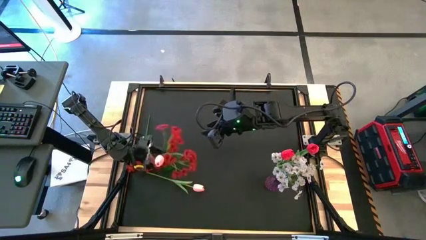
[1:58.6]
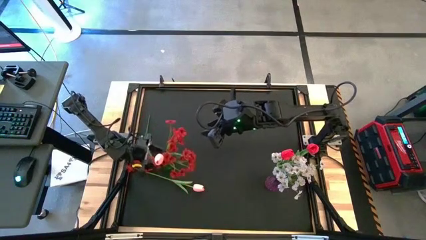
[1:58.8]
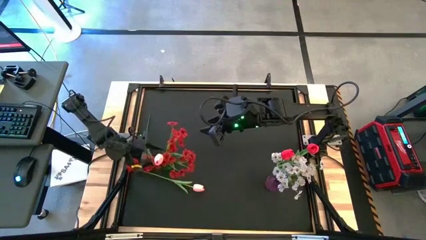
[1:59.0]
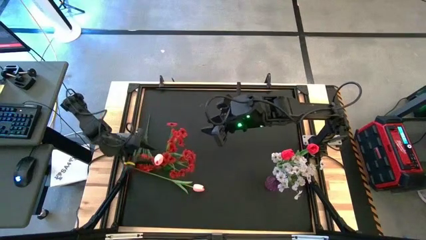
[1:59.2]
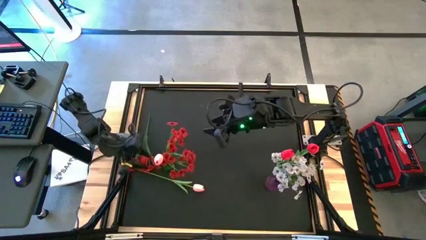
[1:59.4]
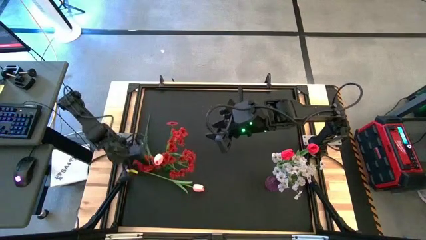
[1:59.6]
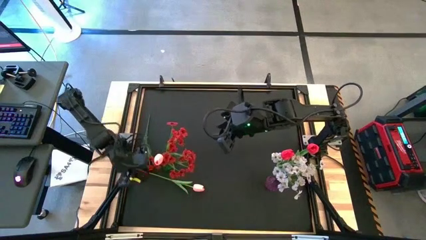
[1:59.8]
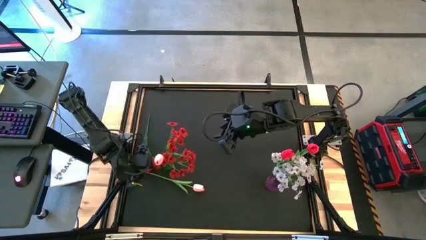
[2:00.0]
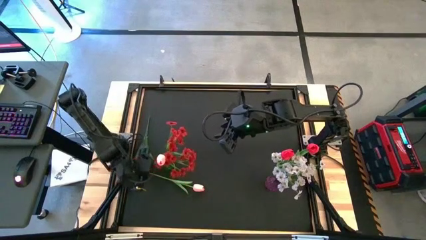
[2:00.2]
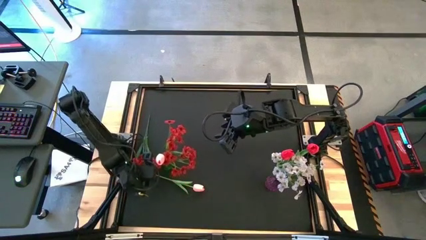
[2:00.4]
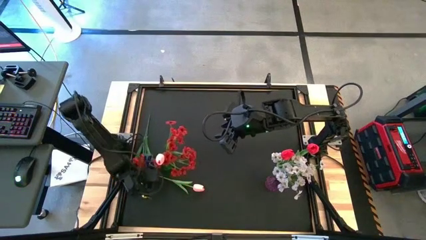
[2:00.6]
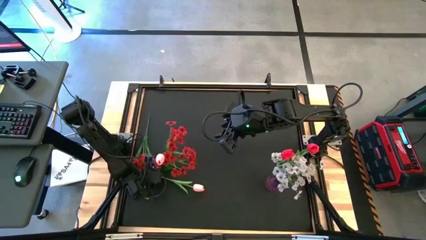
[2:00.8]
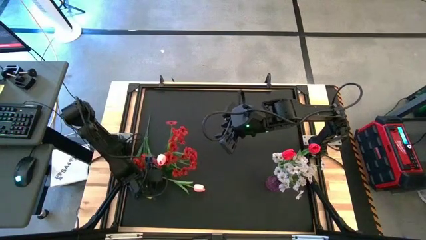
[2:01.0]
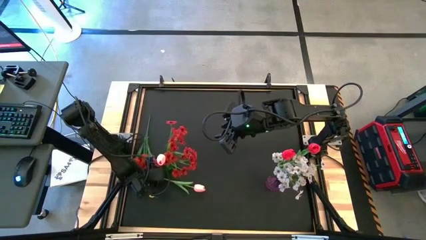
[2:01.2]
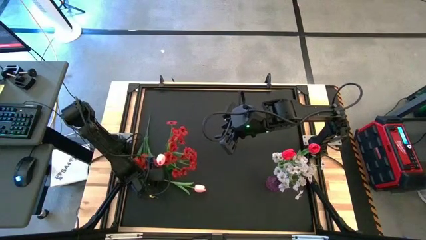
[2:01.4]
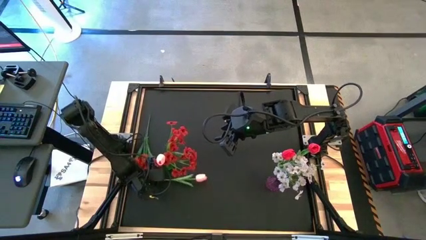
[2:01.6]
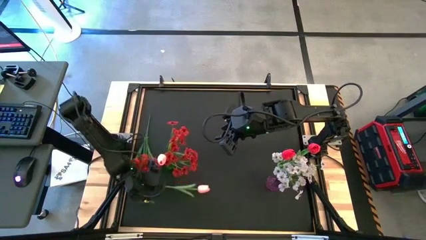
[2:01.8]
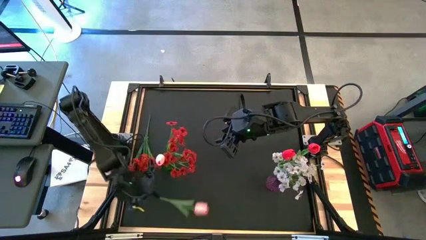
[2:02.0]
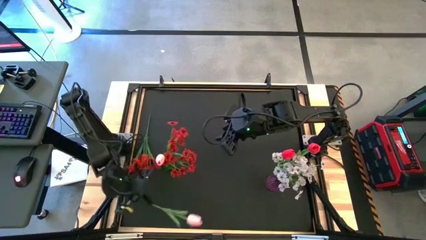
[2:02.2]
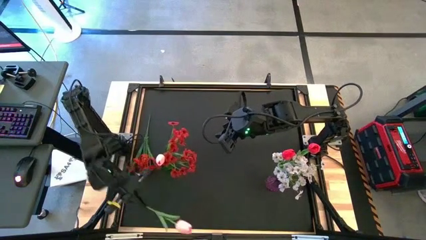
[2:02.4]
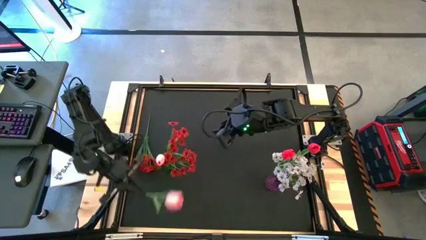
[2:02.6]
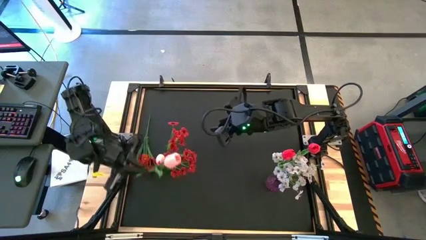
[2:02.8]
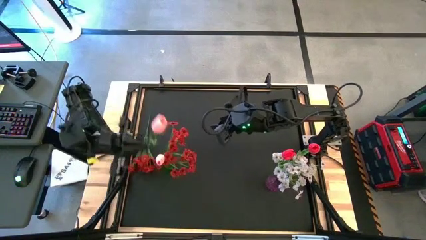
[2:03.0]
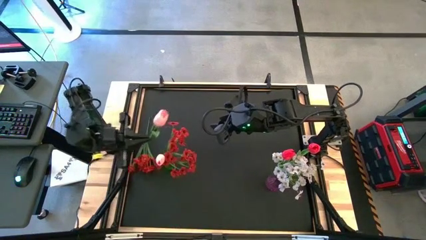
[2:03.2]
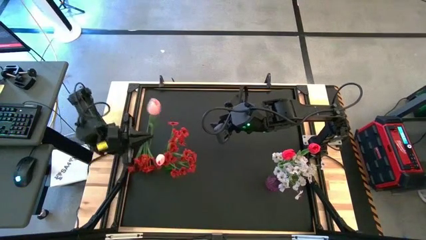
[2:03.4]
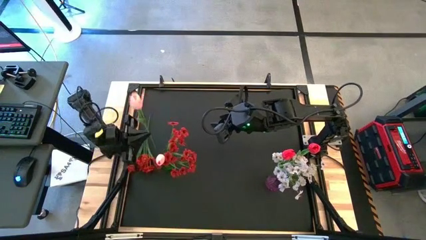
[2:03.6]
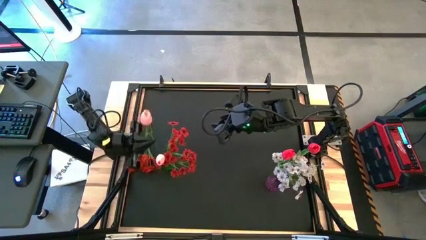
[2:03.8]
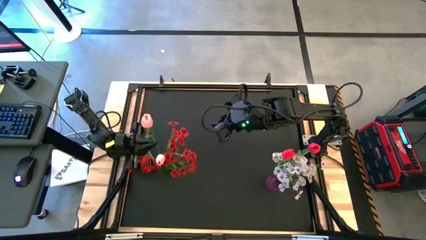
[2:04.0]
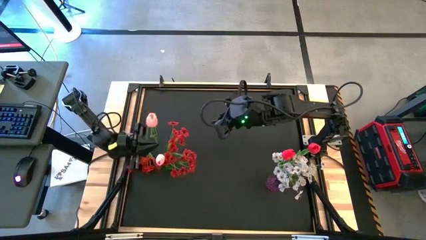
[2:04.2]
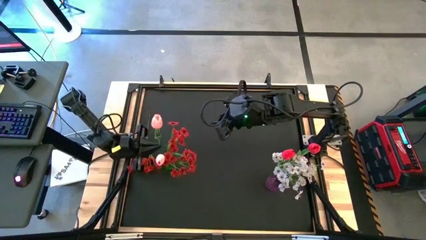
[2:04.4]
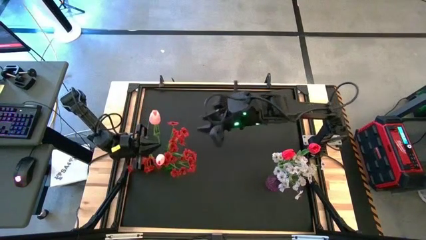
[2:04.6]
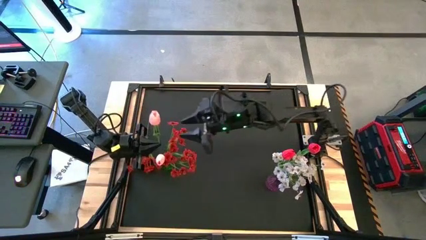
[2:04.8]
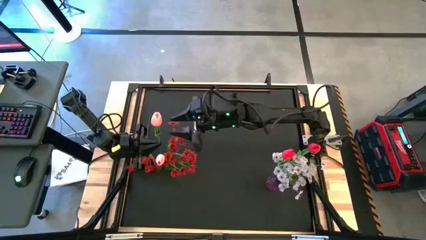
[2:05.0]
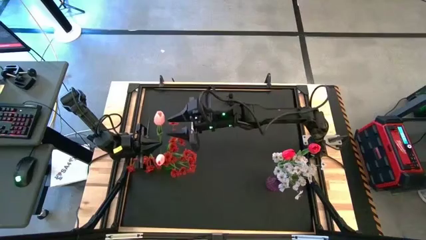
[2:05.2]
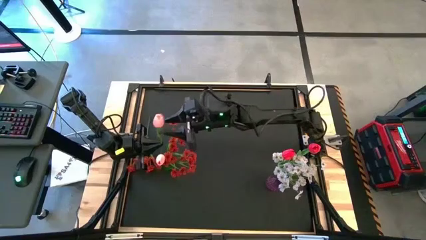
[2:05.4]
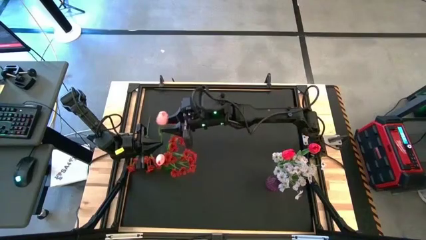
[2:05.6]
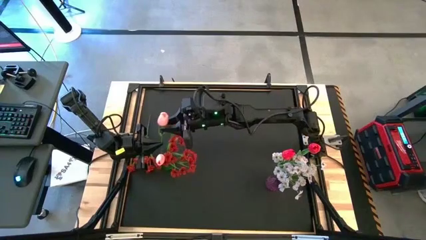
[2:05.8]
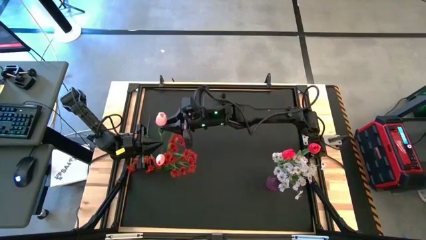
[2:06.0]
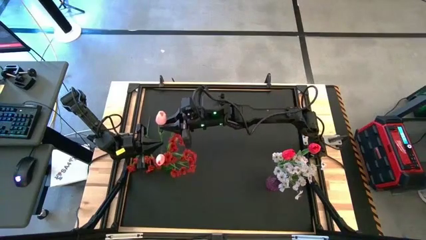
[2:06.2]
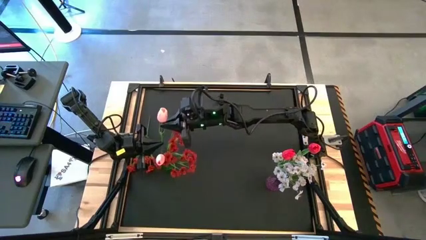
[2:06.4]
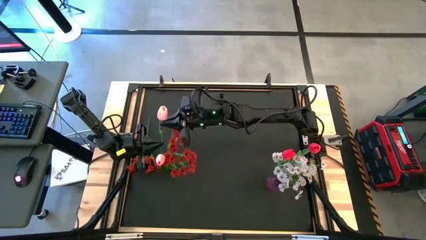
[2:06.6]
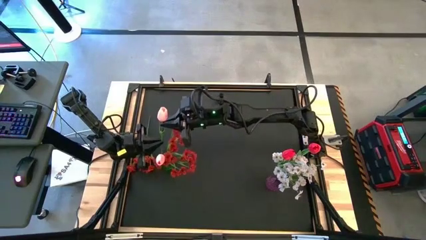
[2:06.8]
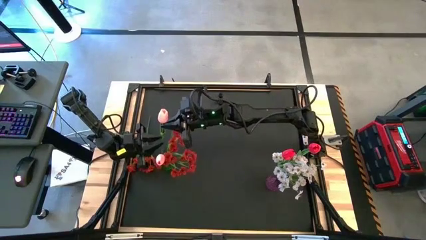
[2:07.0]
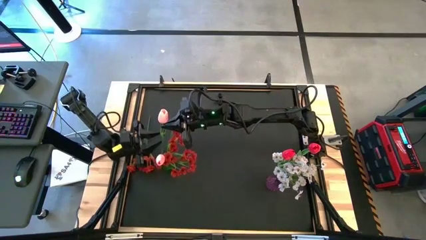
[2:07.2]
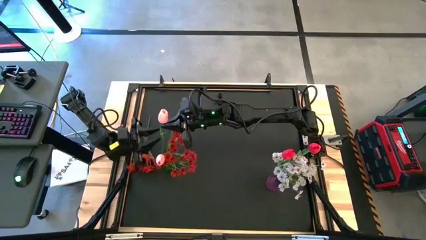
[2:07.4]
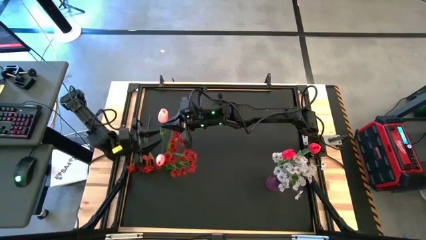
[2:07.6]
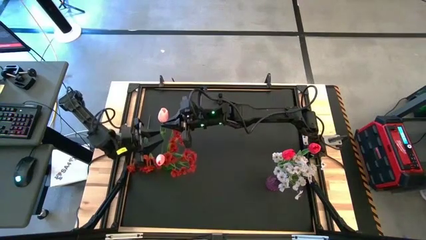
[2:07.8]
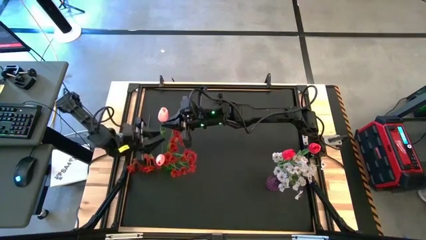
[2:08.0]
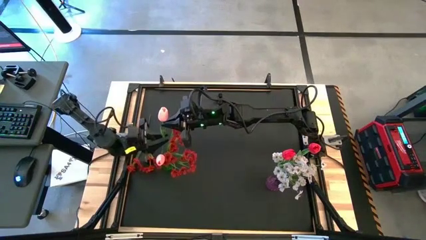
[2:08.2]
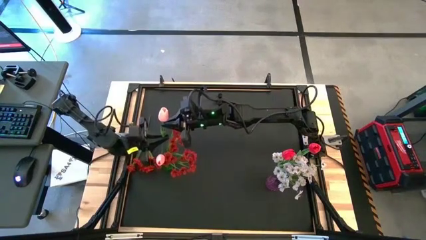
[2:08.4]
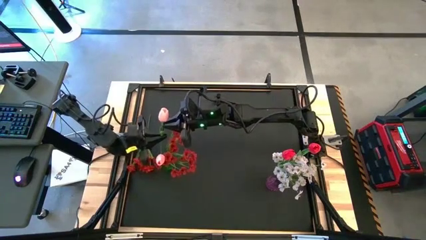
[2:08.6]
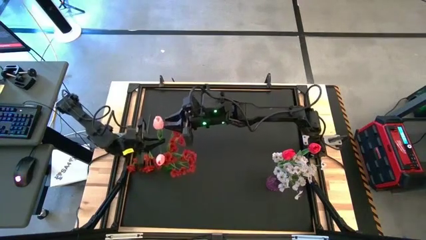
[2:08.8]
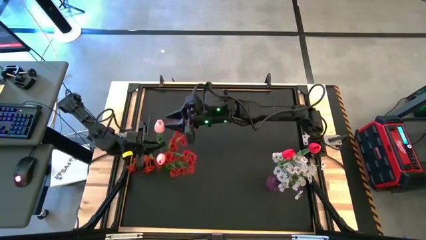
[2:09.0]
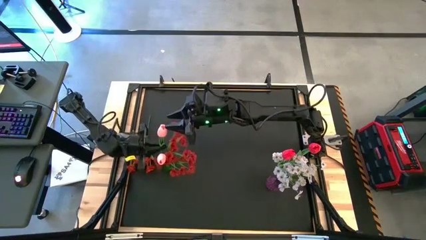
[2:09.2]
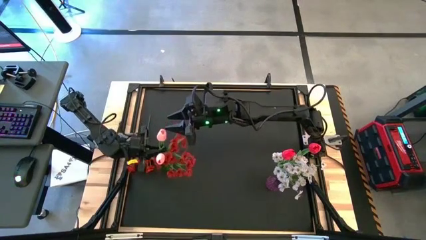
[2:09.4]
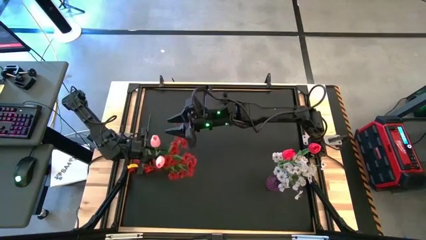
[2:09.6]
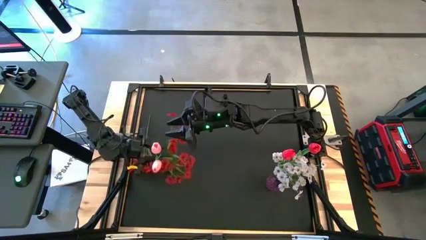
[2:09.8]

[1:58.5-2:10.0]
Task: Sort flowers into vase by color
Put the pink flower into the green vase

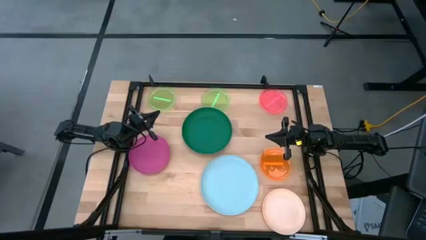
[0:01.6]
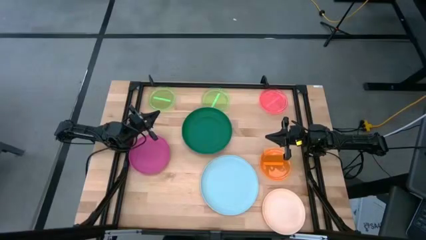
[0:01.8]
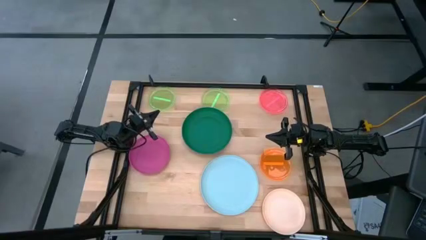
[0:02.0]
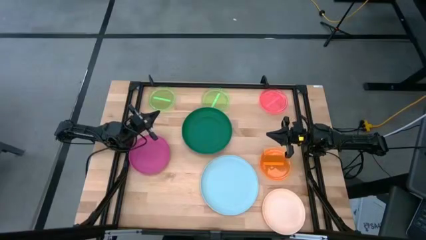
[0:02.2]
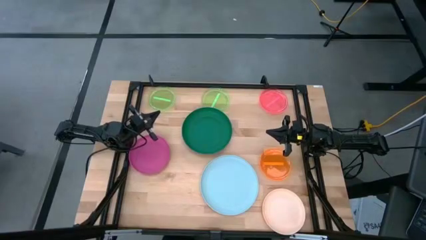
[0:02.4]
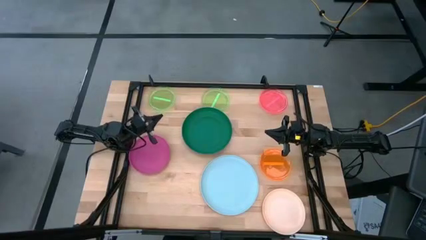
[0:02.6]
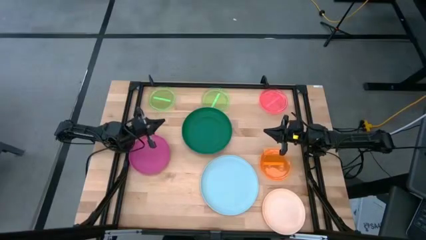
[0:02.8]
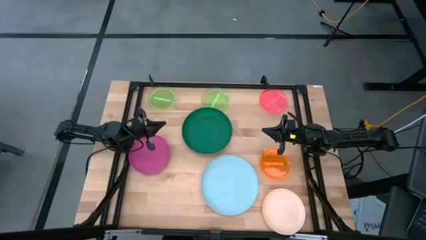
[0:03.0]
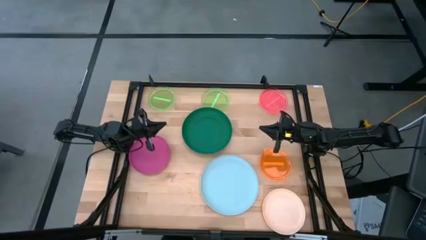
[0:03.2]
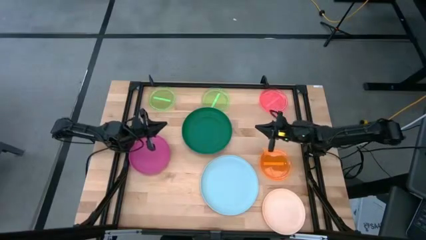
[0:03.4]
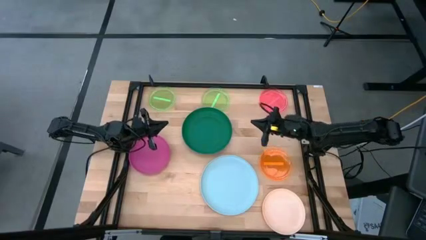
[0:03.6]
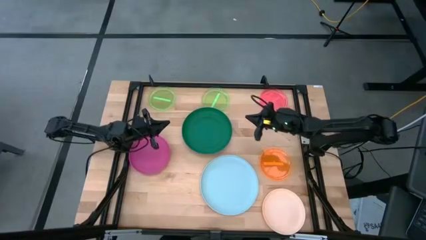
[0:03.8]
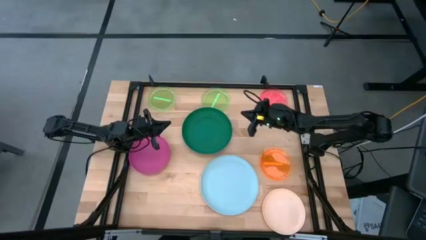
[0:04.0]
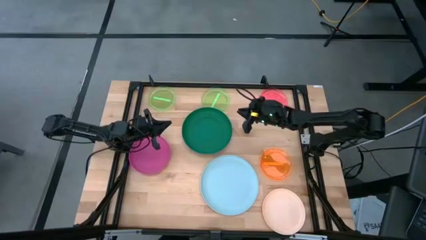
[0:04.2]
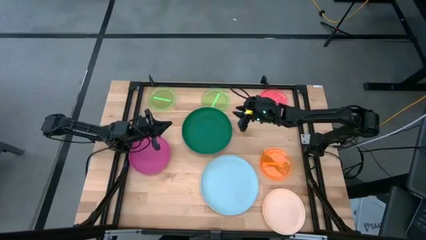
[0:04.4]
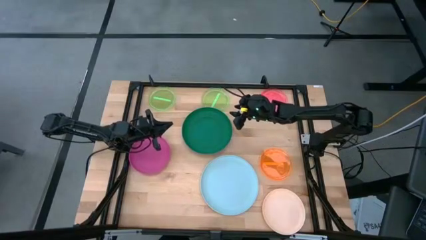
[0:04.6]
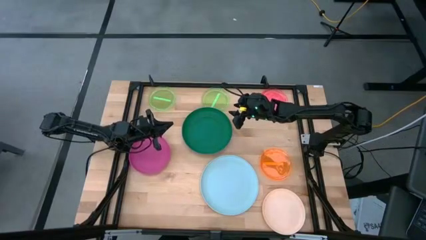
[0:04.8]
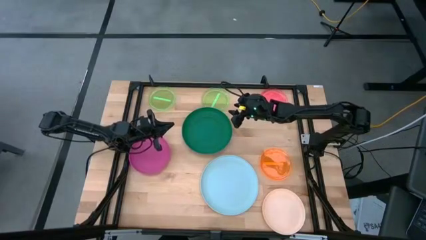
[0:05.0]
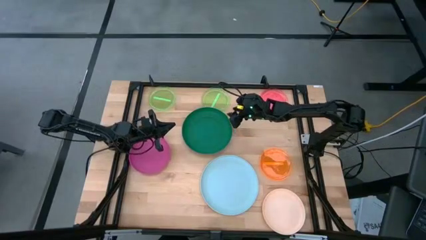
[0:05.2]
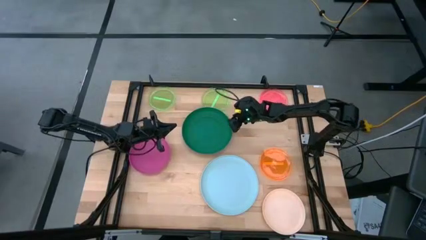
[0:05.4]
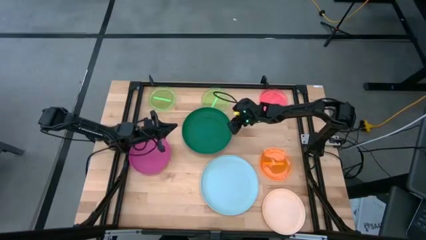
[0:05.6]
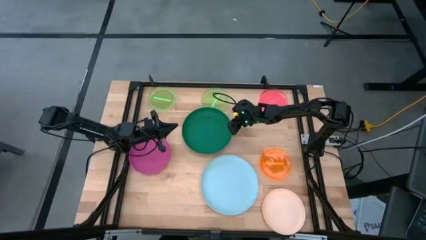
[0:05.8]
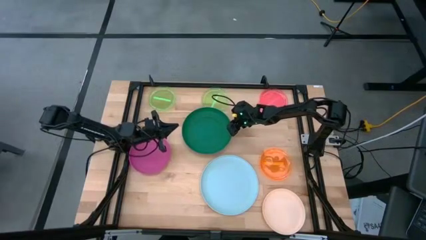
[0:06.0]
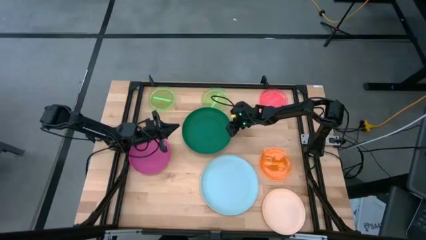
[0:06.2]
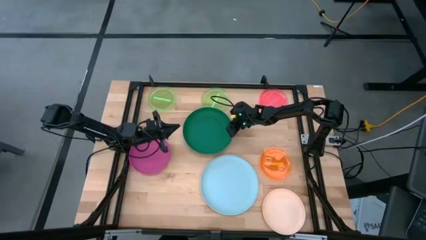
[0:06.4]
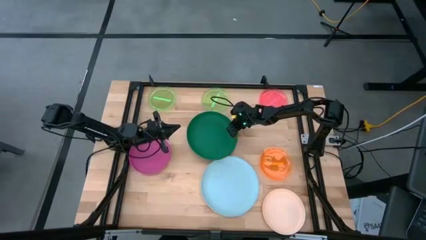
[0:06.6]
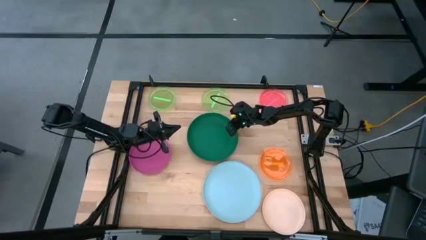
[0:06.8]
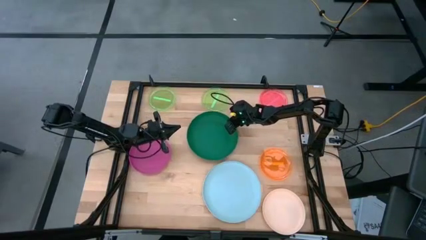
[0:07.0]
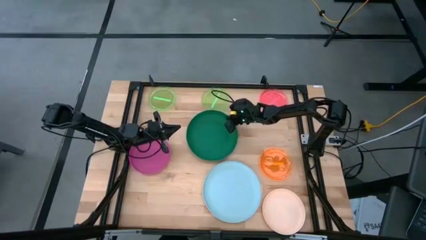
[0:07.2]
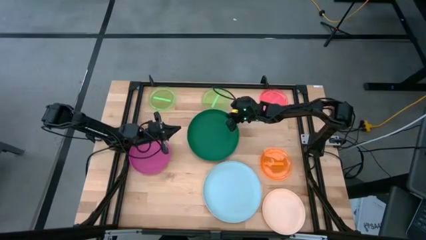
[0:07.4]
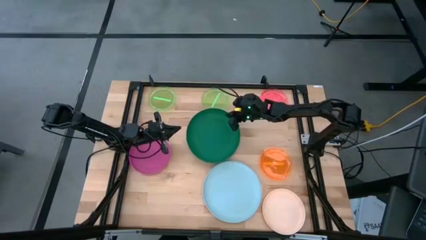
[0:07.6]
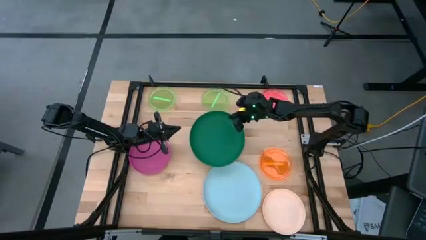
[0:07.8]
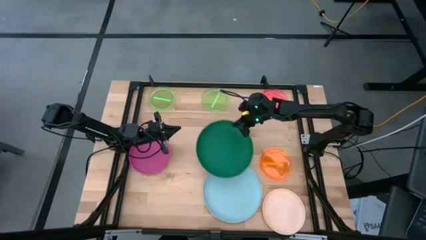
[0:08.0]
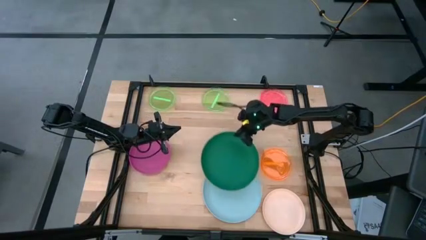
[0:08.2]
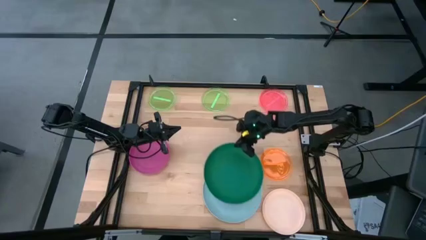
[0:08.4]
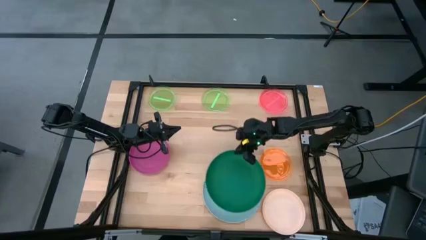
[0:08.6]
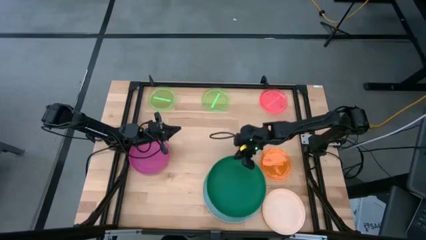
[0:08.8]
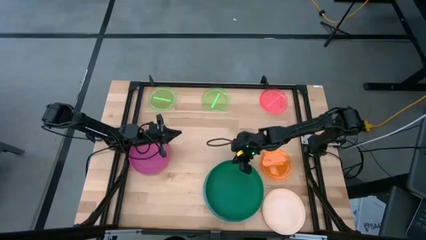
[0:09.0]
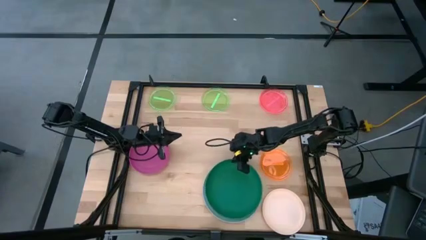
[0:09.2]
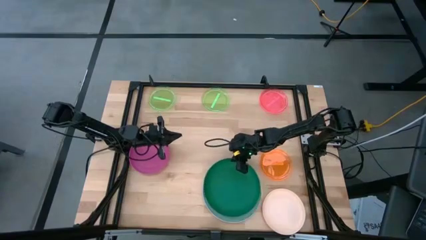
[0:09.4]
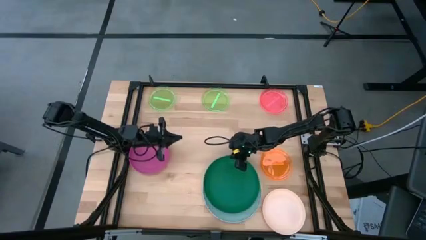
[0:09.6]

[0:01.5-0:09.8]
Task: Stack plastic plates
Stack the green plate on top of the blue plate
